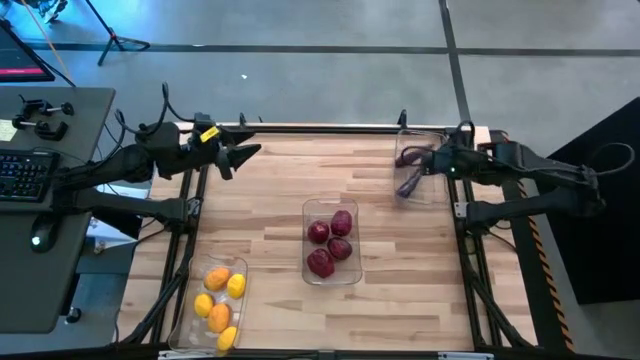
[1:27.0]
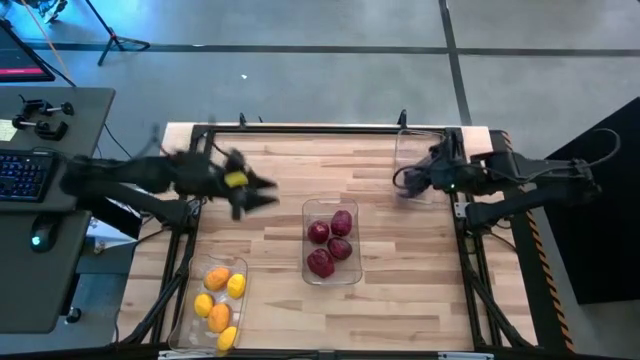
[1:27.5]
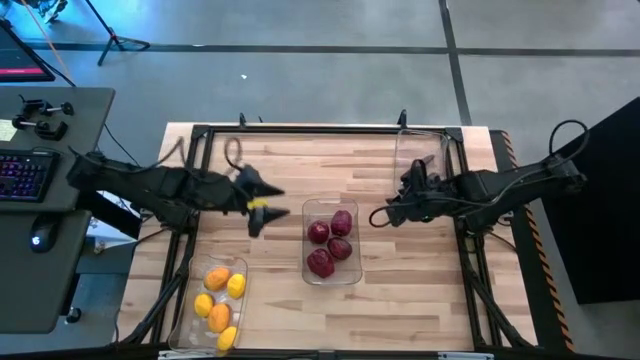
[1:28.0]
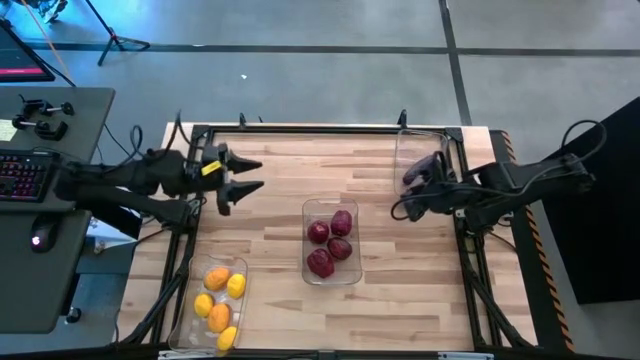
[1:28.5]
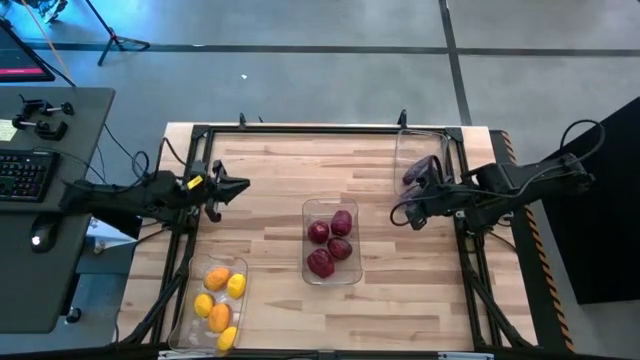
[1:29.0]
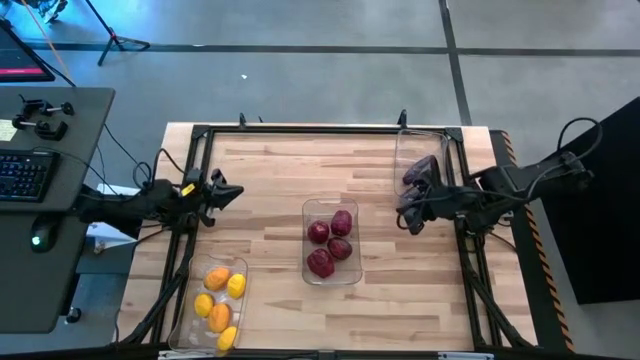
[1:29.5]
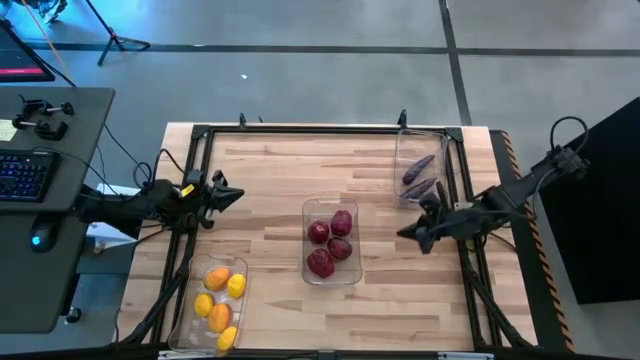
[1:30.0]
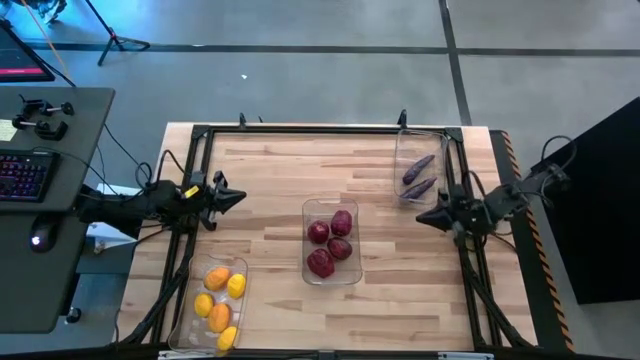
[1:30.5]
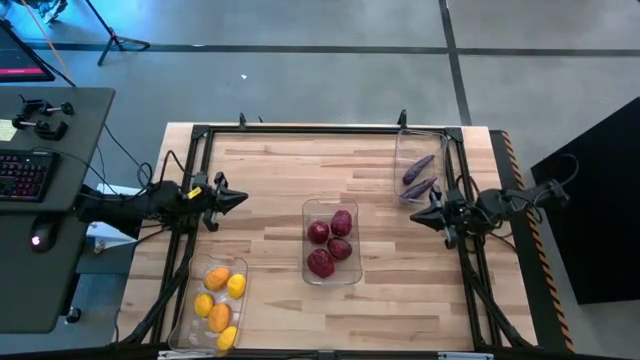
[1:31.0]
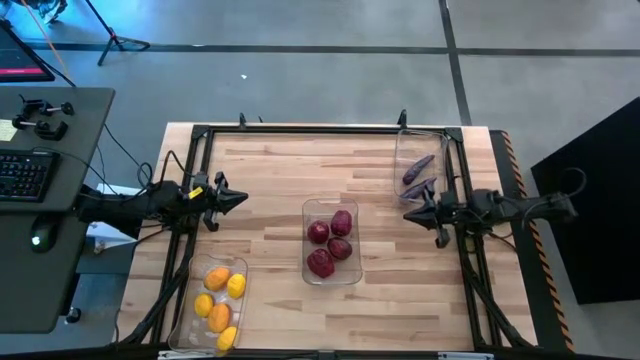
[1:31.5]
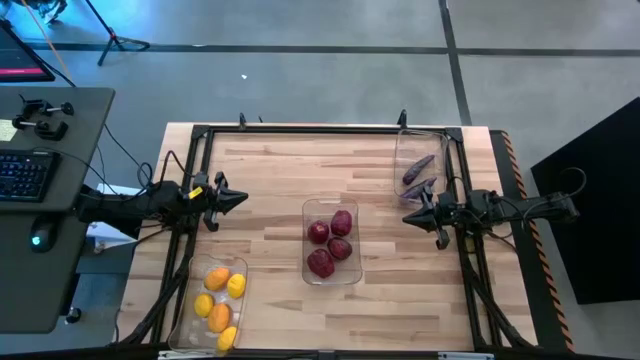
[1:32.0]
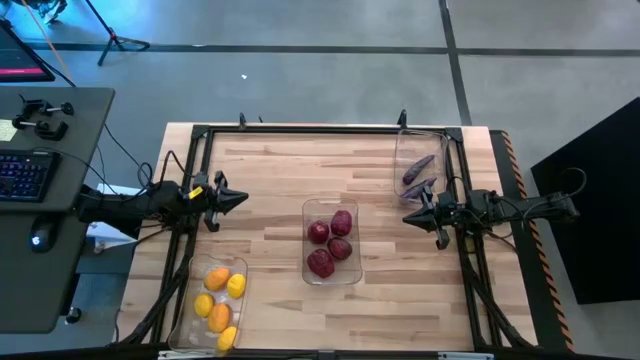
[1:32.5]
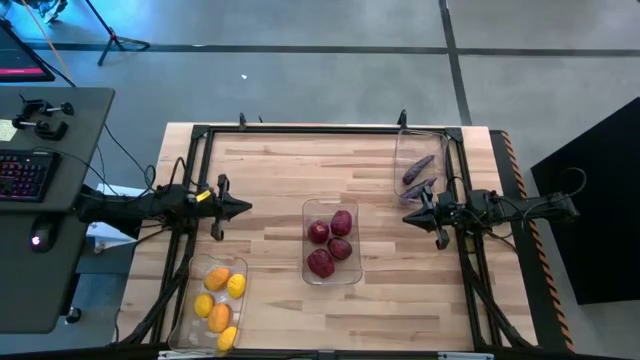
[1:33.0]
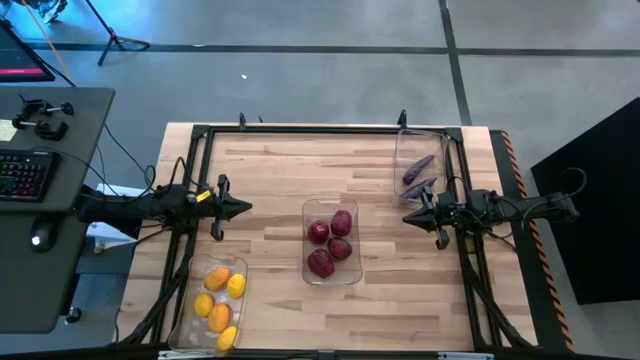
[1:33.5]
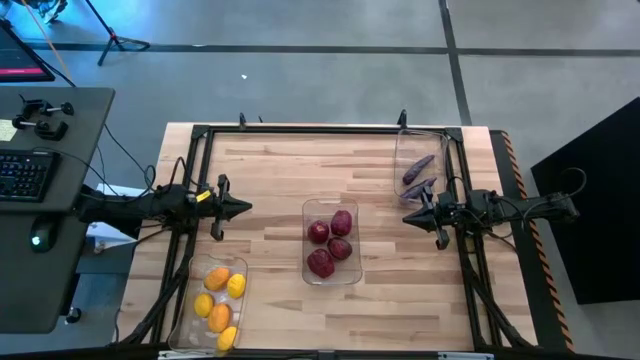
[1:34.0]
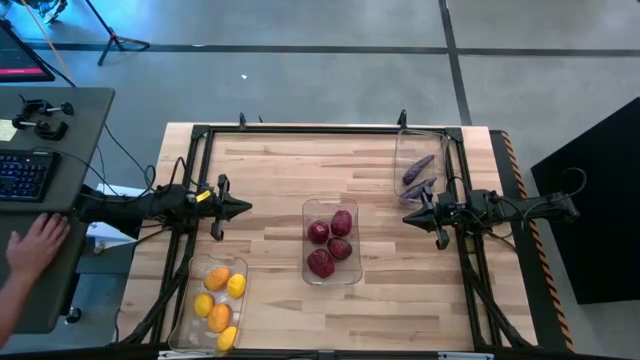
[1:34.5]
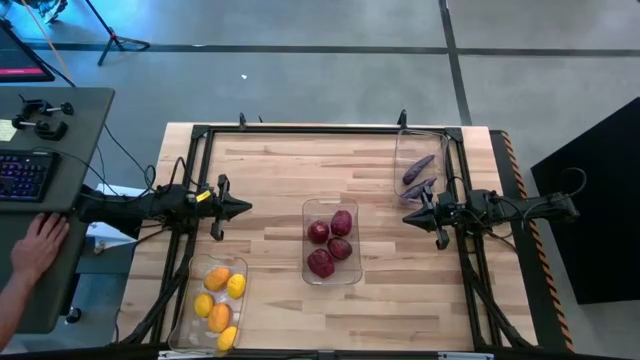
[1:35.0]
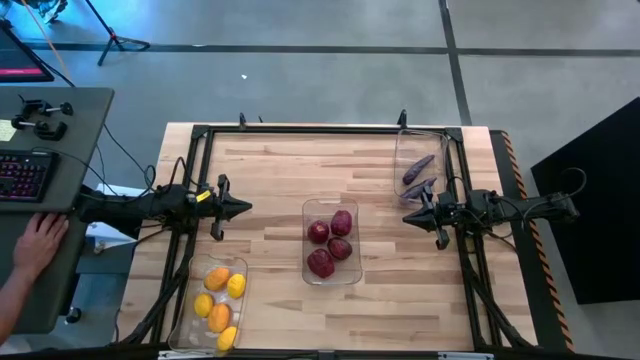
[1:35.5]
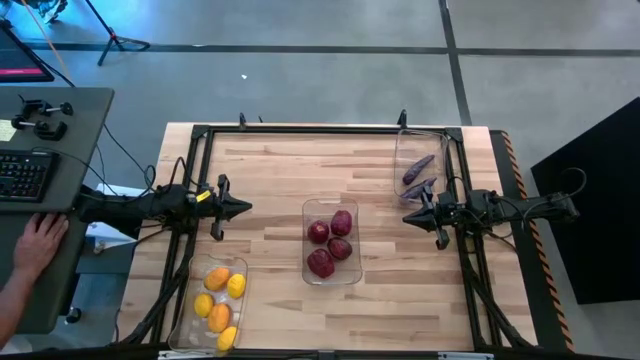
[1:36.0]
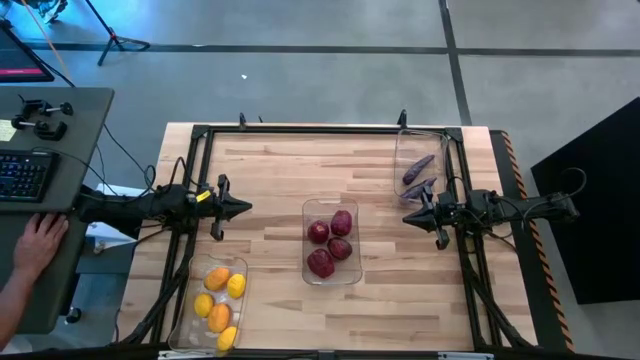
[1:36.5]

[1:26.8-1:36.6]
Task: Sort produce into baskets
Return to Home Position

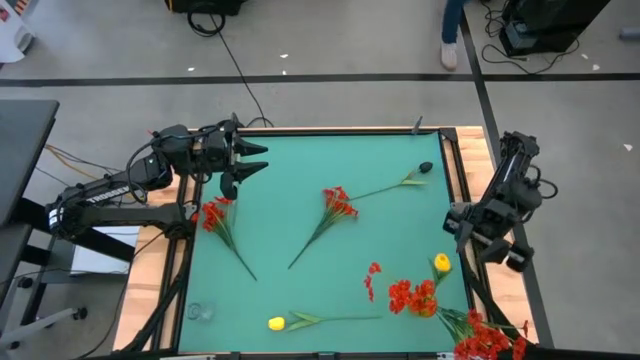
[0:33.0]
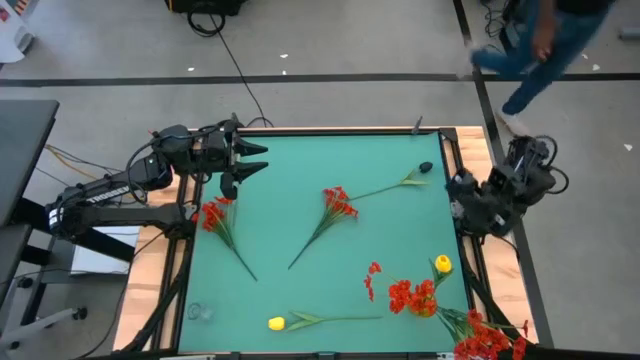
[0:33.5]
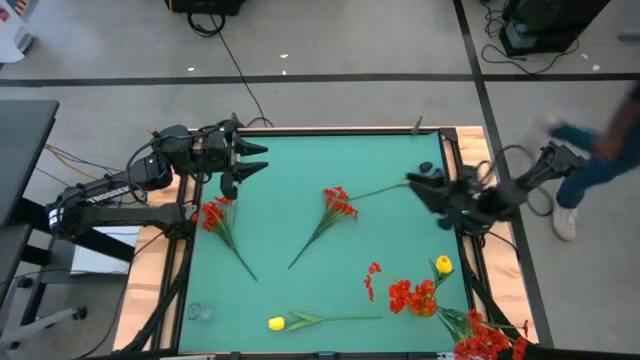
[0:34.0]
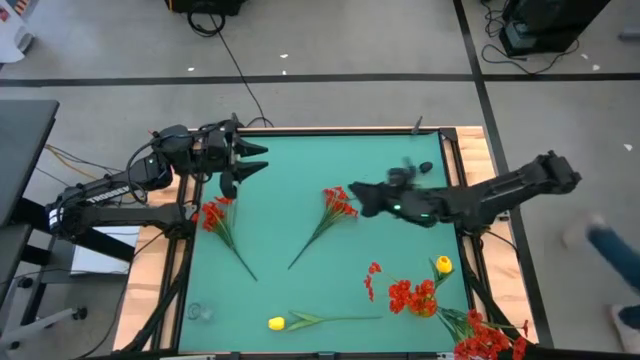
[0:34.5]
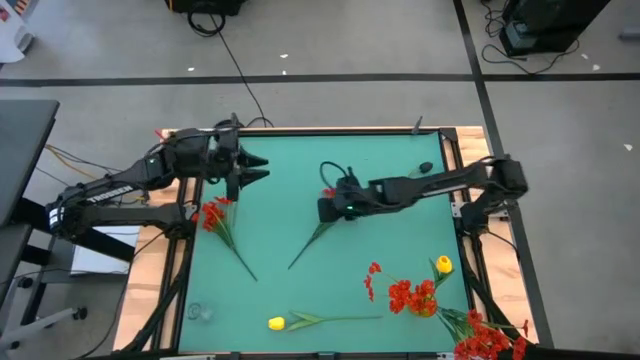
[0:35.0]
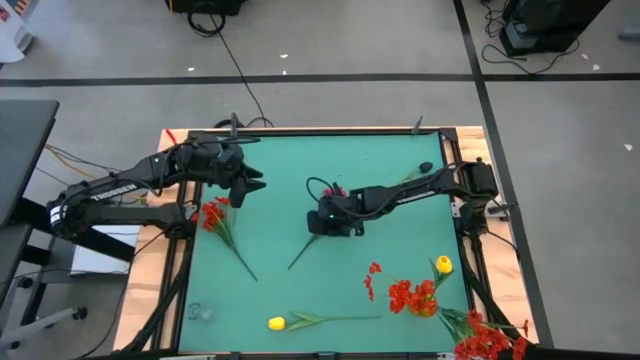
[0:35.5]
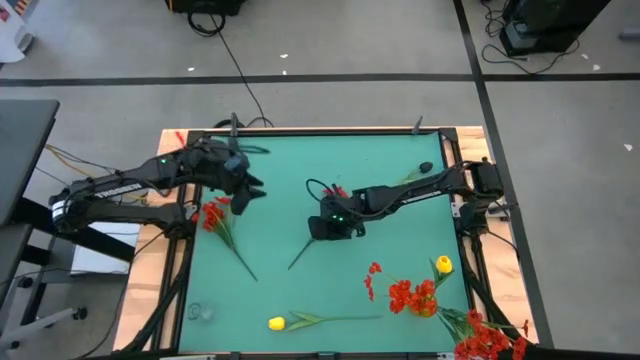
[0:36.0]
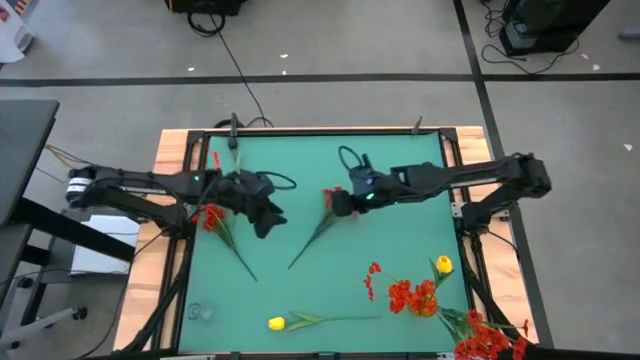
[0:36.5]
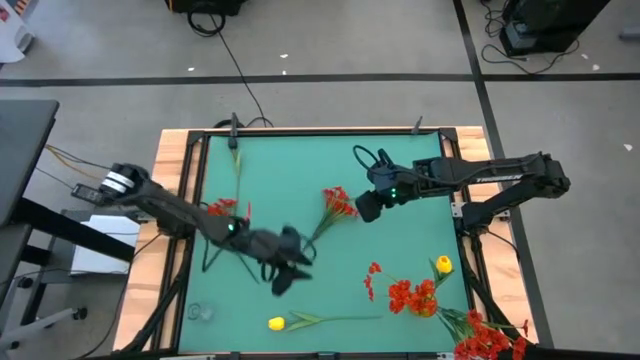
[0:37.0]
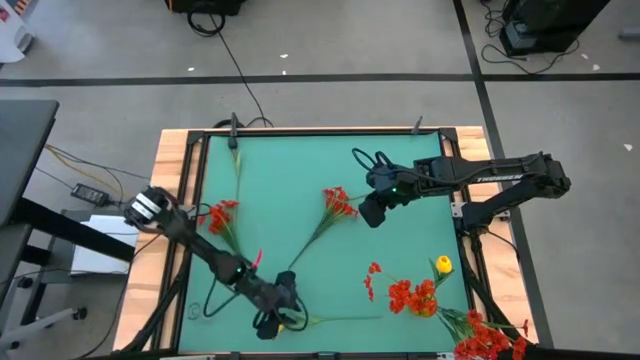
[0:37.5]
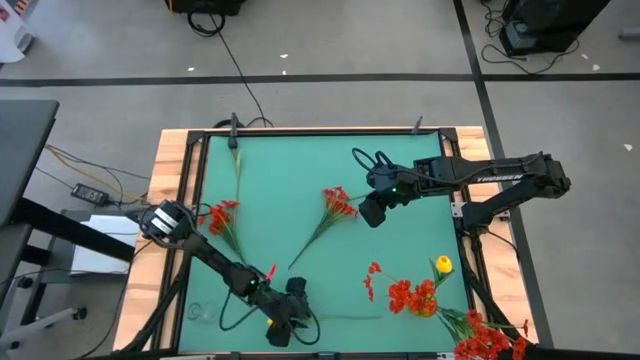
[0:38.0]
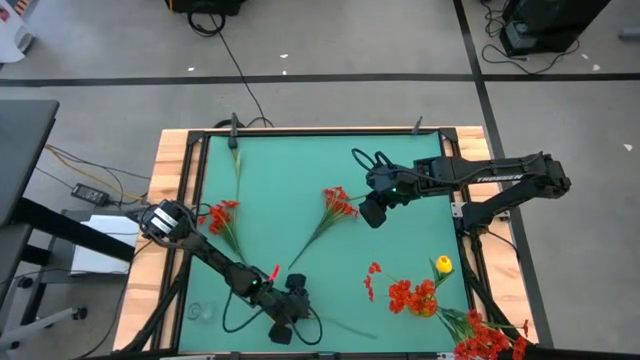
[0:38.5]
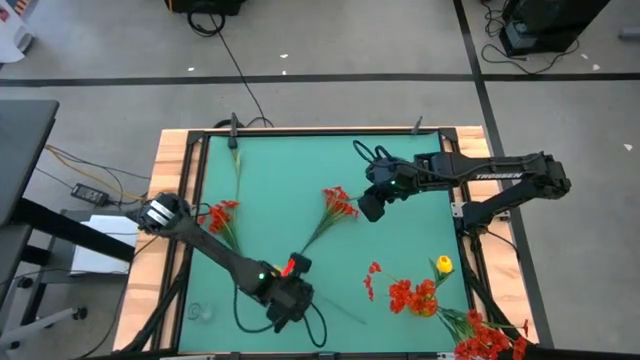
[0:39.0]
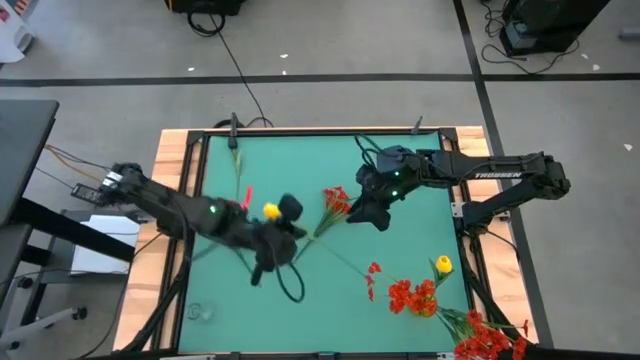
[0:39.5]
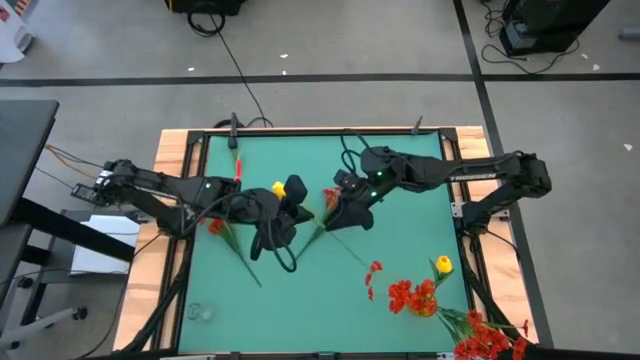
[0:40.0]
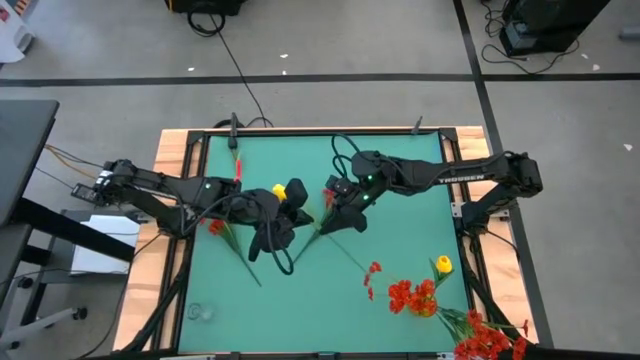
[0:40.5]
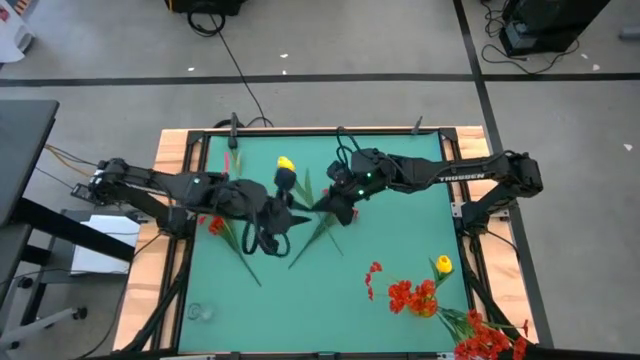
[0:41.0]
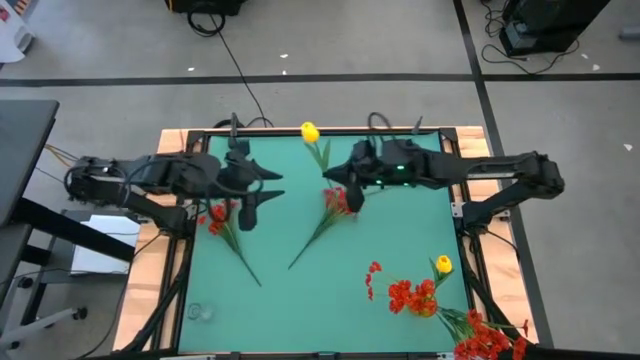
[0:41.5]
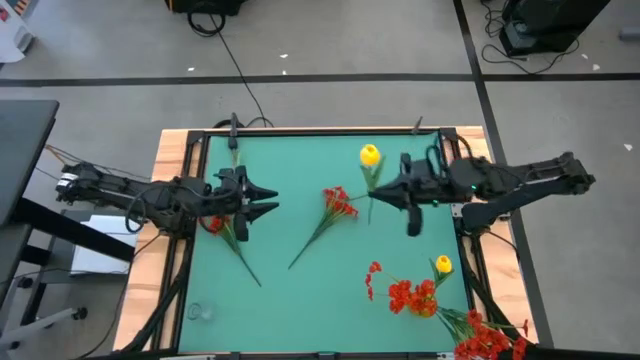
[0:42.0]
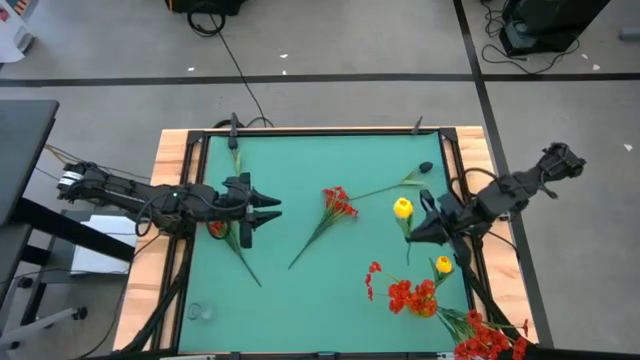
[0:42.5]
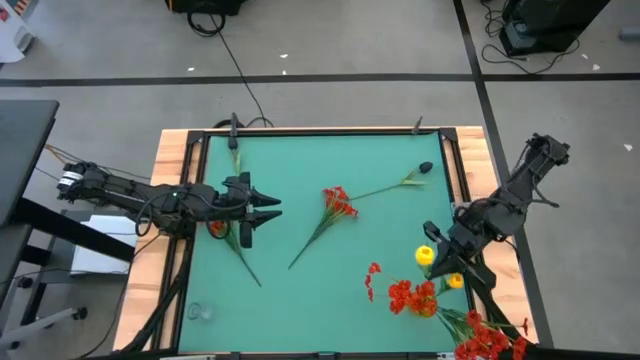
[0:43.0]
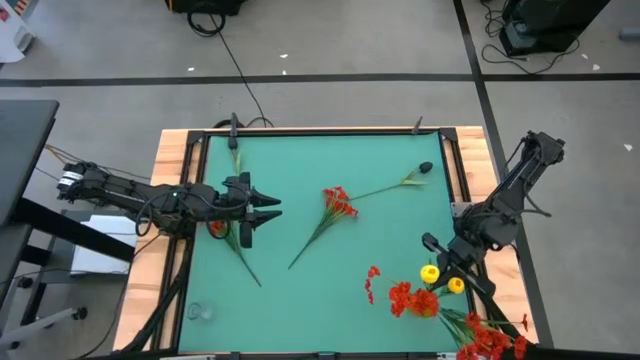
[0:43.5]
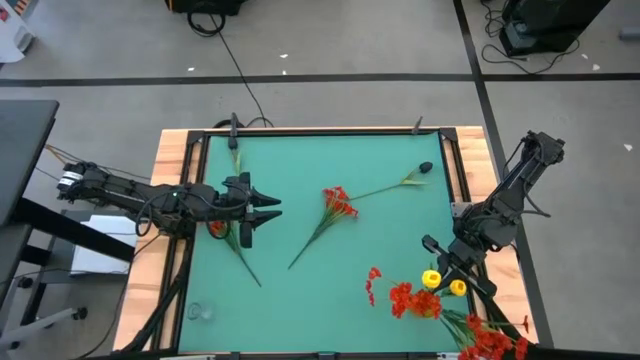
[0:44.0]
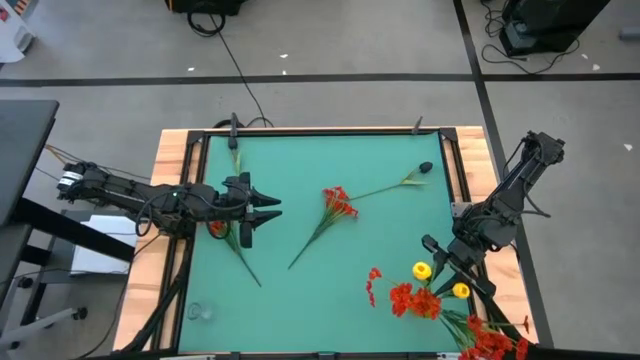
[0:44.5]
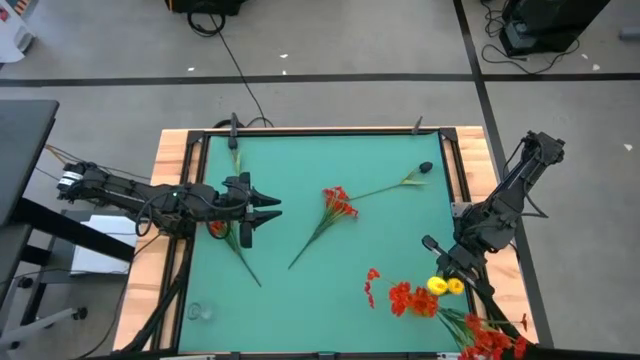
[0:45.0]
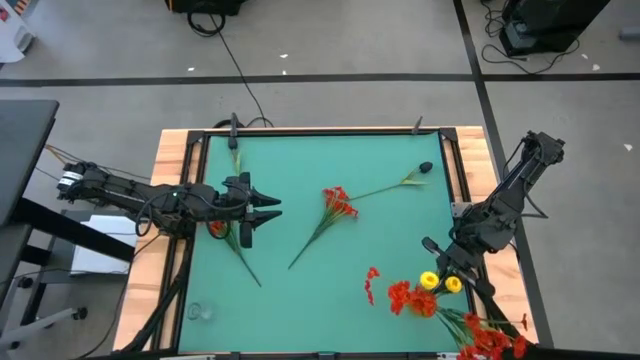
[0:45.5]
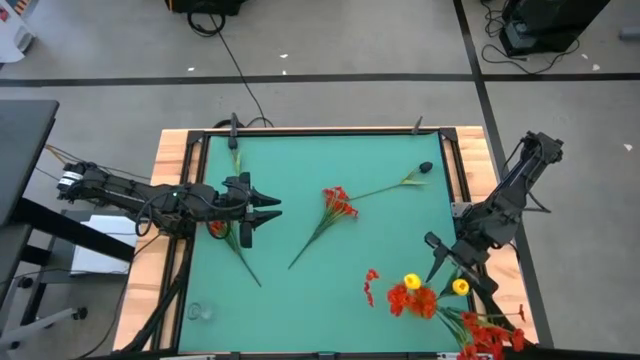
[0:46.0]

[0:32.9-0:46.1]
Task: Sort flowers into vase by color
Put the yellow flower into the yellow flower vase
